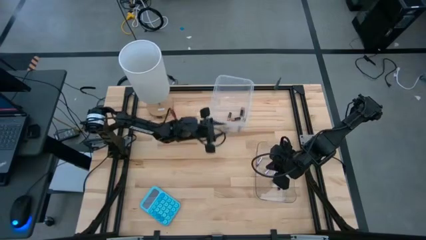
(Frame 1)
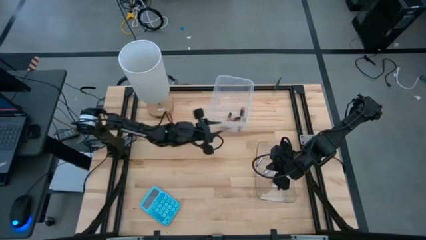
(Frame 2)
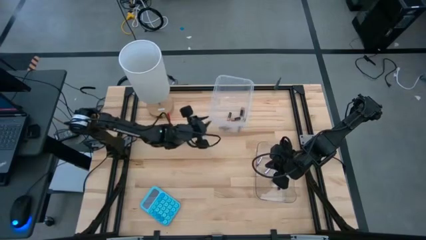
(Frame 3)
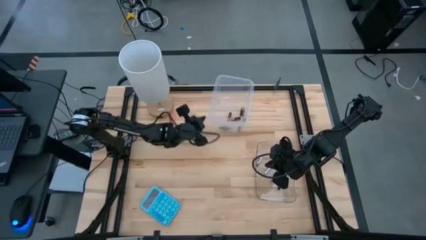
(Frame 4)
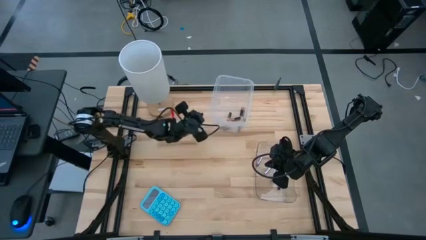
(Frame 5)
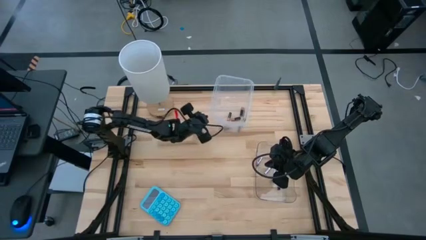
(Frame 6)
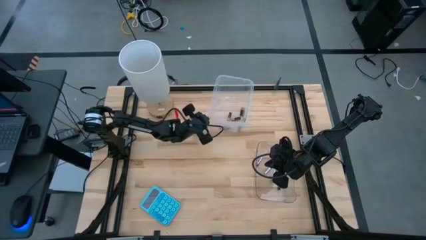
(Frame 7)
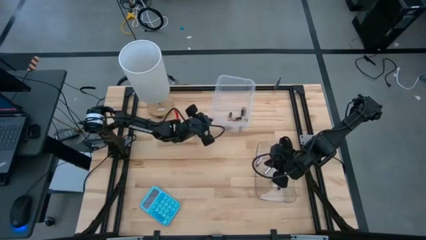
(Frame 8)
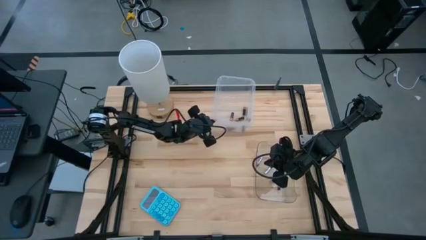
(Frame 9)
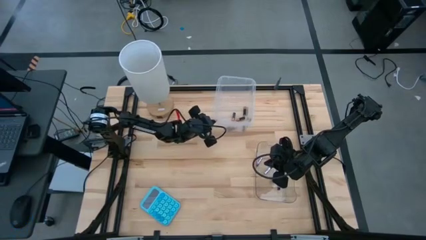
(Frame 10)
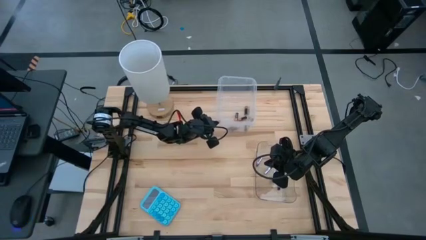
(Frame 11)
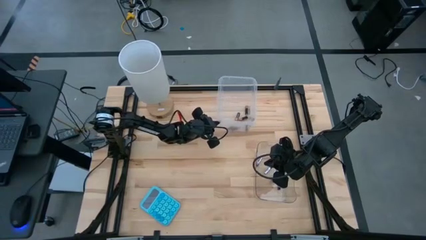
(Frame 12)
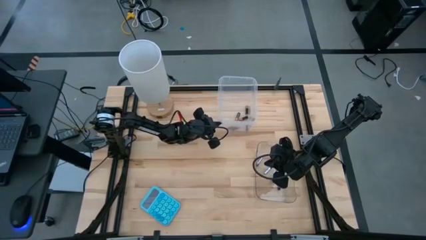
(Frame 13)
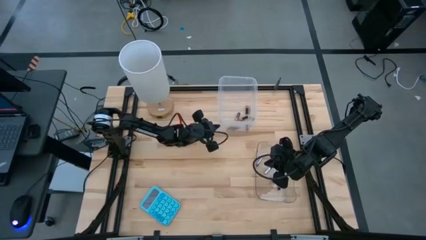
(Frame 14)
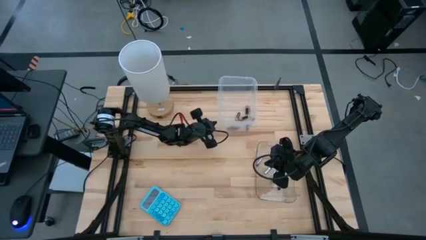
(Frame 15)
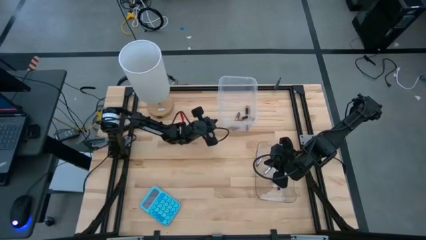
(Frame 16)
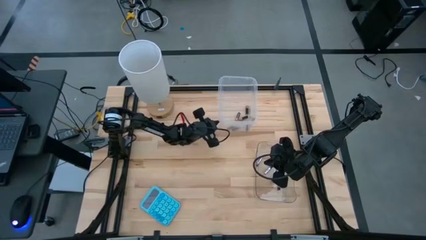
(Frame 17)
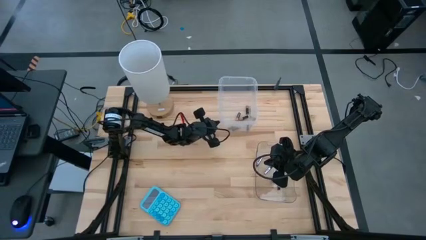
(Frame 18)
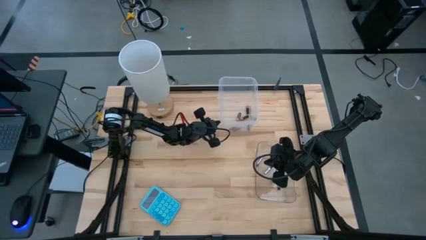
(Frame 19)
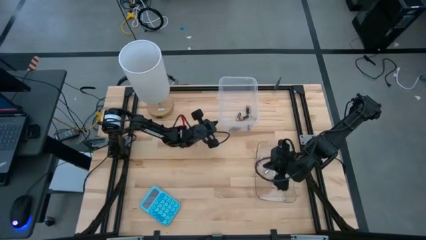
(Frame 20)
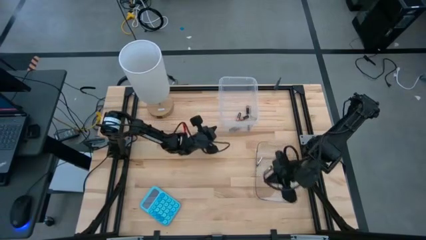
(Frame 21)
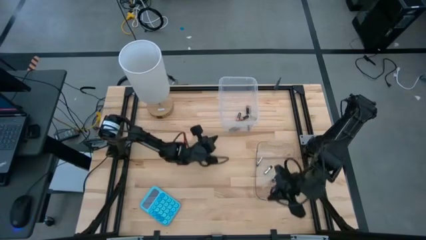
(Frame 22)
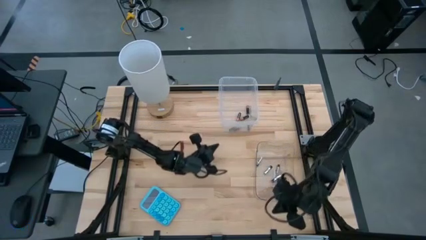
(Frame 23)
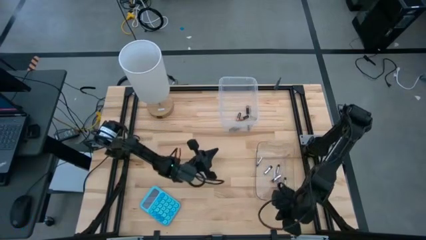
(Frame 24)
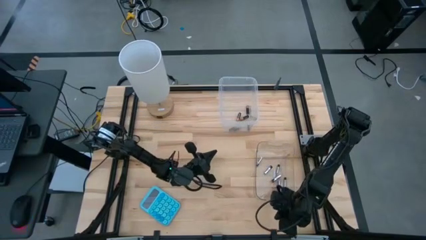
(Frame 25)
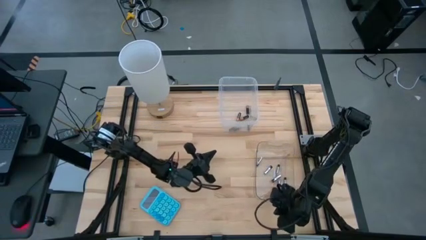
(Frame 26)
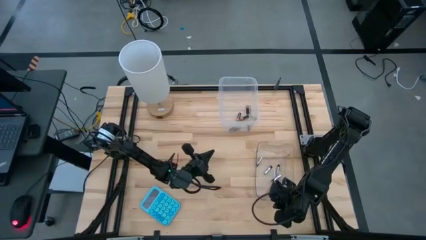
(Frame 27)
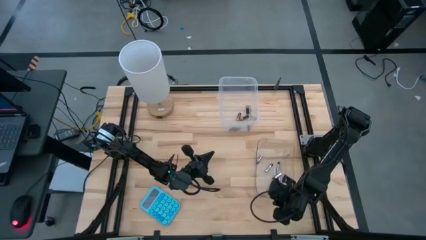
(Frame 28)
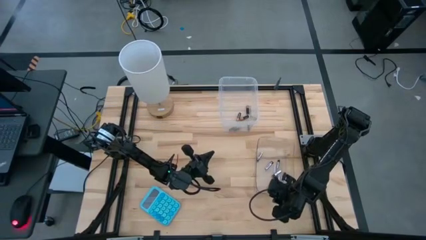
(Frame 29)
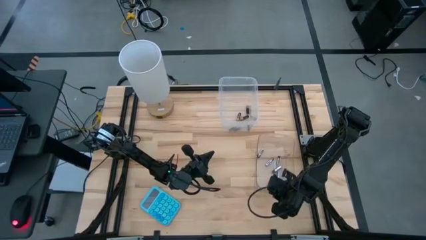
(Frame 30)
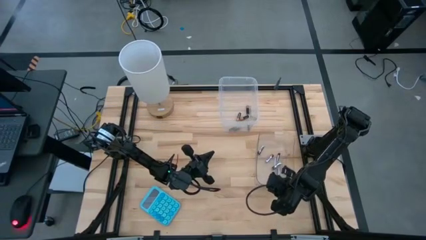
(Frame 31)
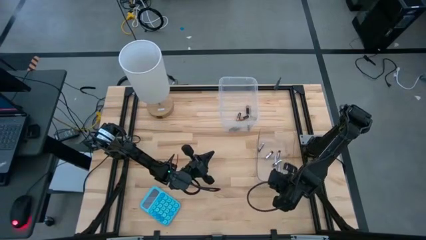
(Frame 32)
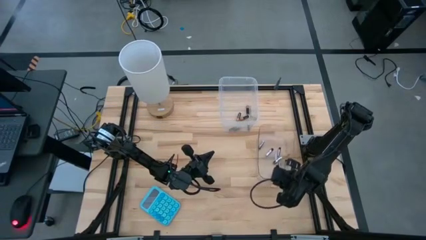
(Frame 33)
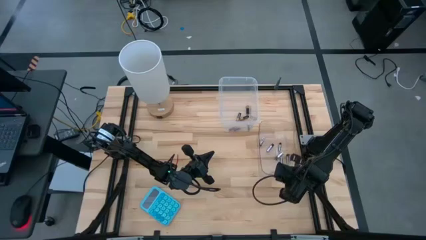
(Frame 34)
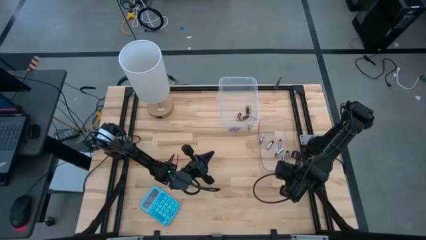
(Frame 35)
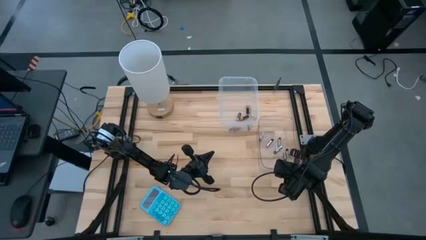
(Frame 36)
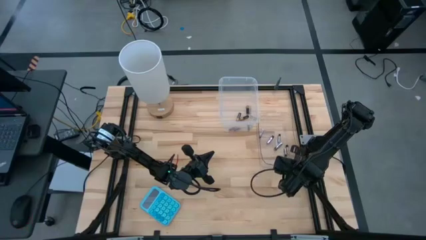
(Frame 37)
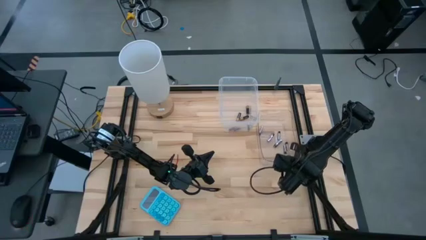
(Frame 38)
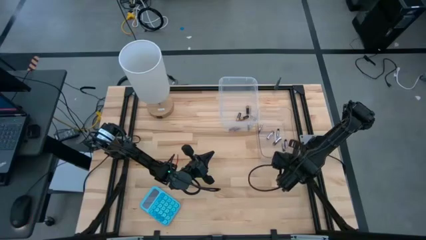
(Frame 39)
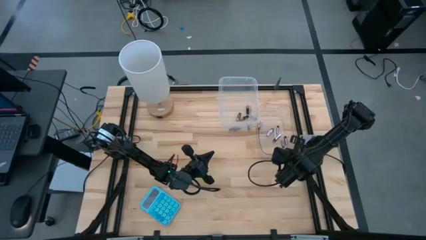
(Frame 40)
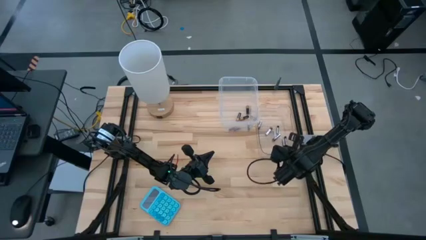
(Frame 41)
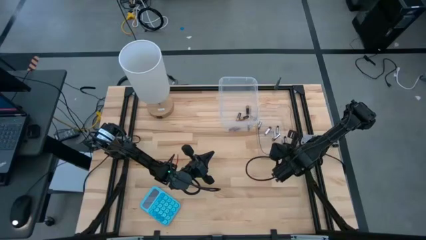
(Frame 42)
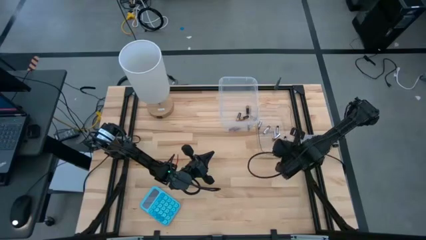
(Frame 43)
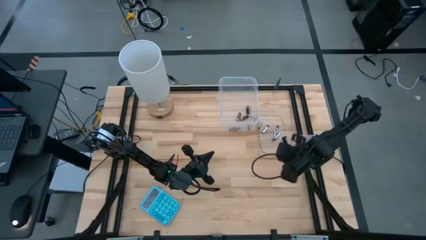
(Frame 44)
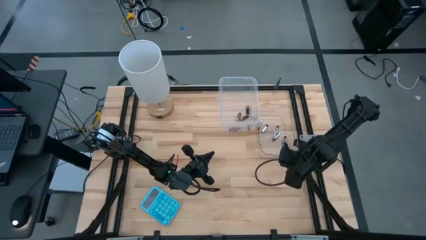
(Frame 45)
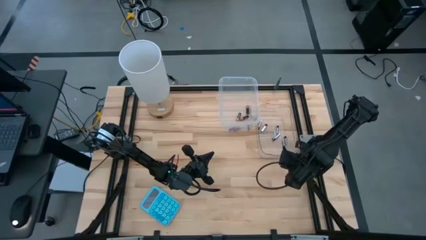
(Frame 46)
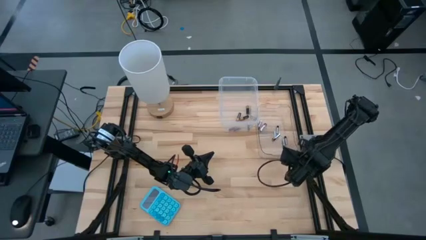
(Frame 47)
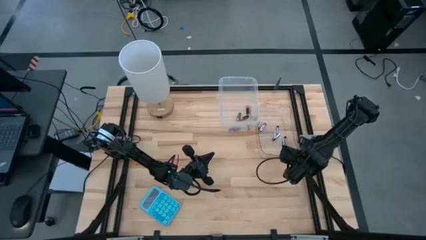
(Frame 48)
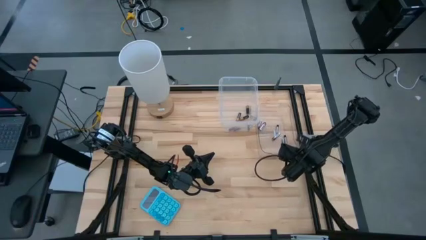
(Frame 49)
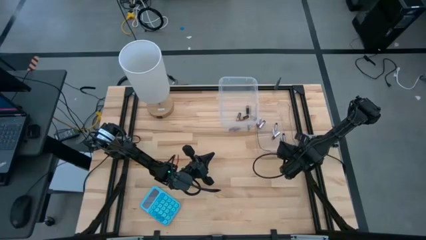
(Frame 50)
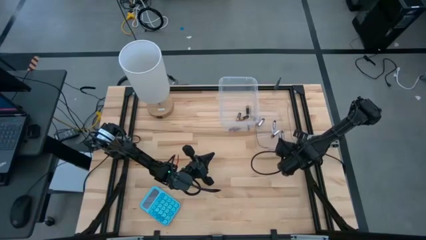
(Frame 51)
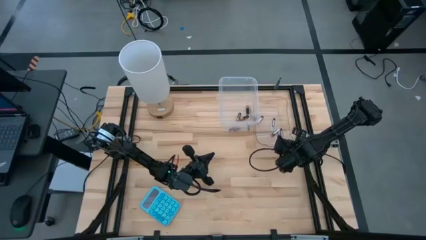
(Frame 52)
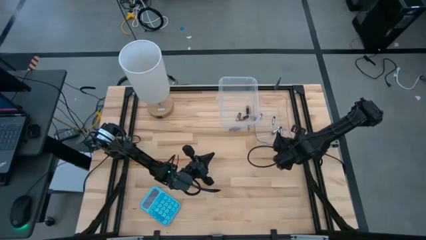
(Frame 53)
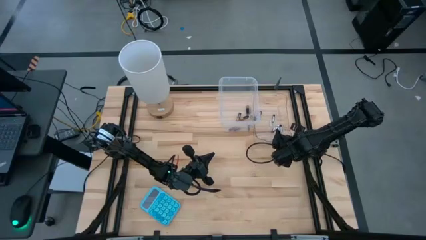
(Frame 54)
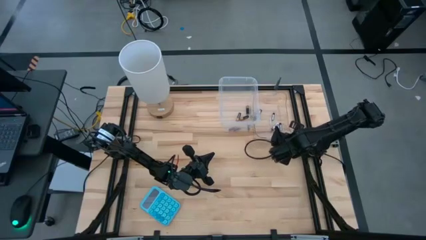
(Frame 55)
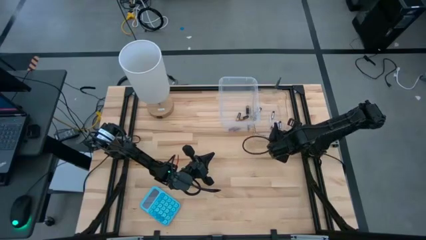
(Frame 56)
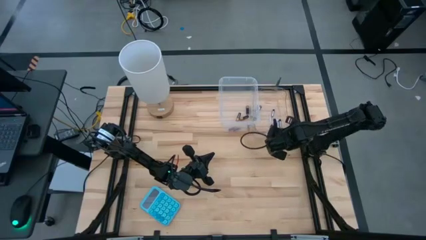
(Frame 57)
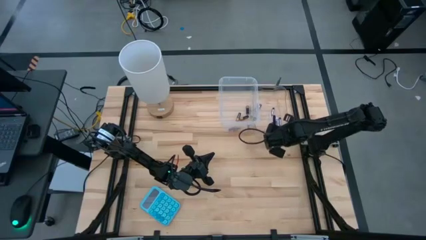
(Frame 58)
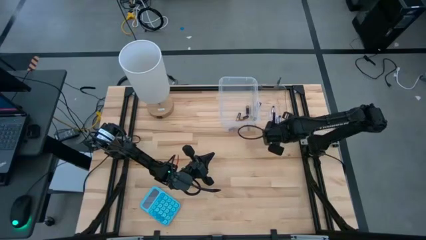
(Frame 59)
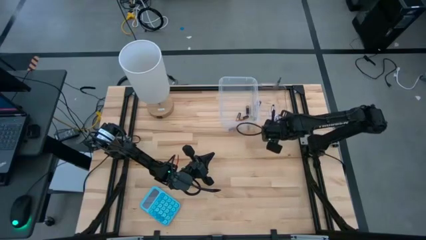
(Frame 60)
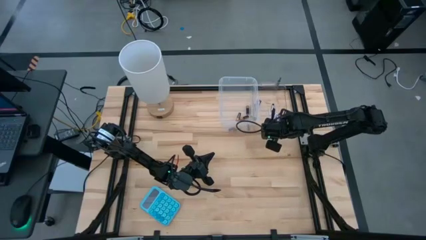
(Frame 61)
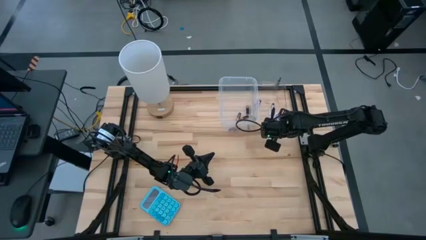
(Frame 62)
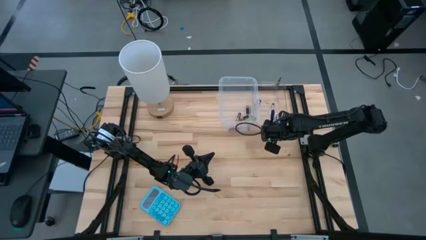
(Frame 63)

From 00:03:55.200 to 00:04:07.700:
Task: Sort batteries
Adjust the transparent bins

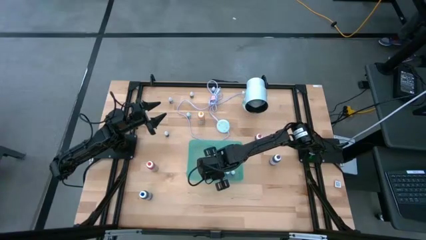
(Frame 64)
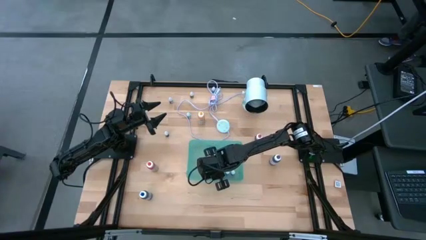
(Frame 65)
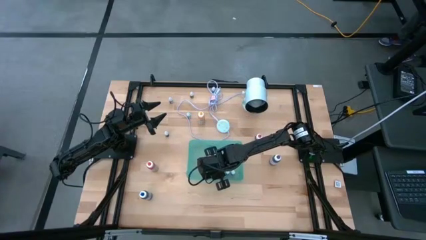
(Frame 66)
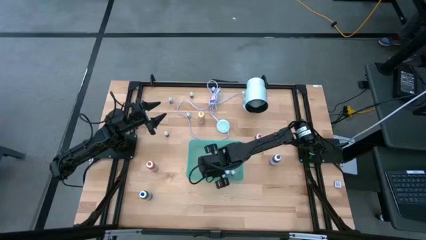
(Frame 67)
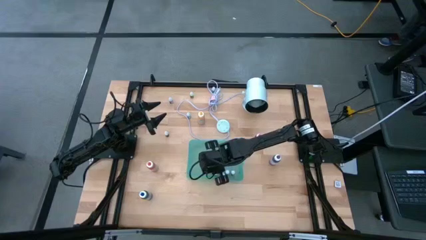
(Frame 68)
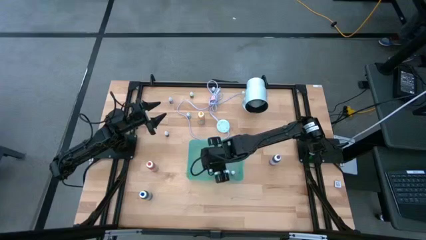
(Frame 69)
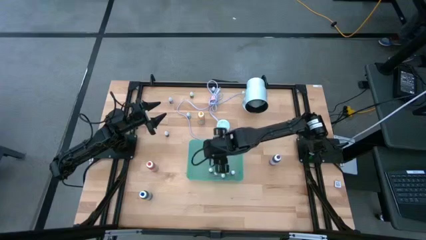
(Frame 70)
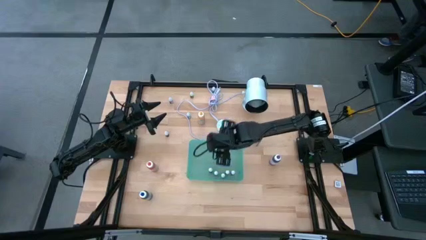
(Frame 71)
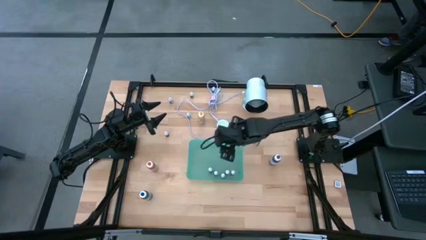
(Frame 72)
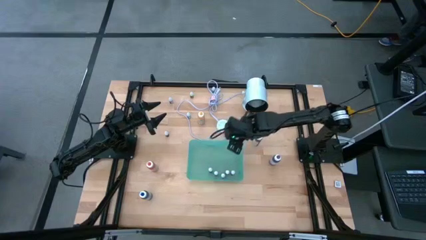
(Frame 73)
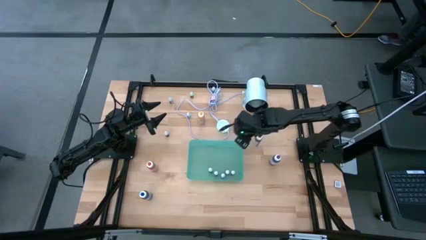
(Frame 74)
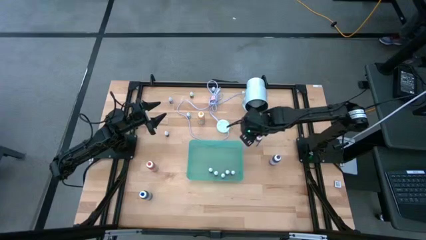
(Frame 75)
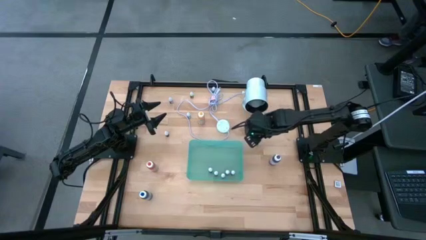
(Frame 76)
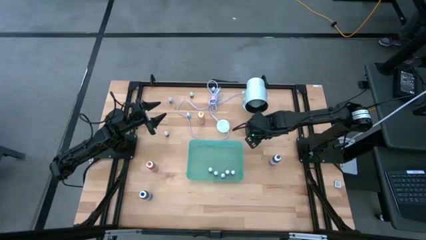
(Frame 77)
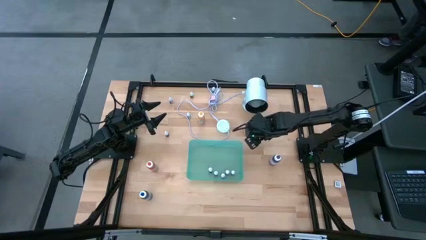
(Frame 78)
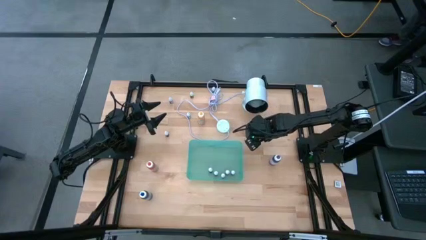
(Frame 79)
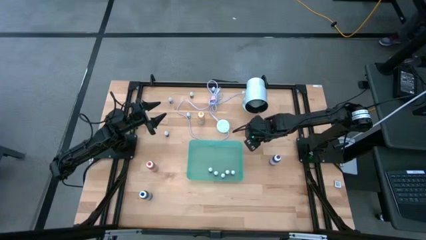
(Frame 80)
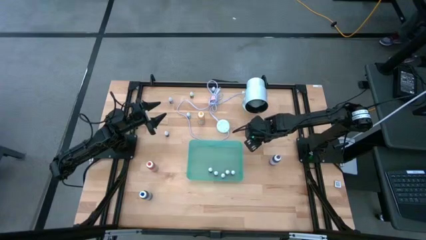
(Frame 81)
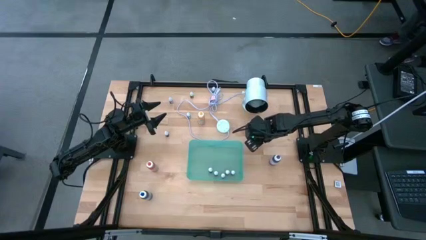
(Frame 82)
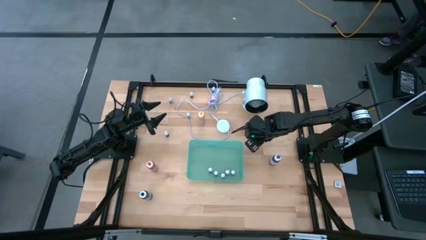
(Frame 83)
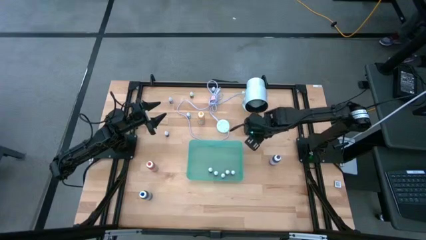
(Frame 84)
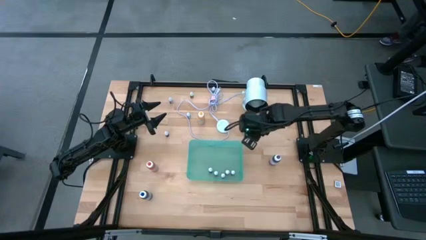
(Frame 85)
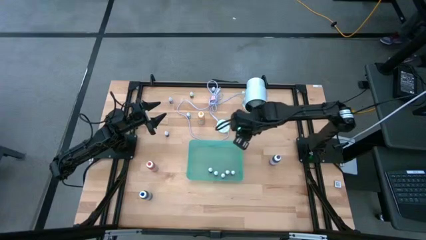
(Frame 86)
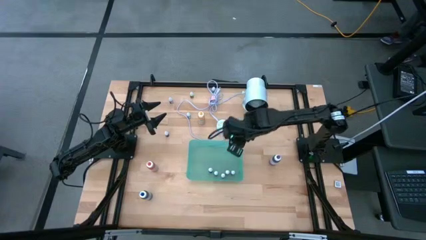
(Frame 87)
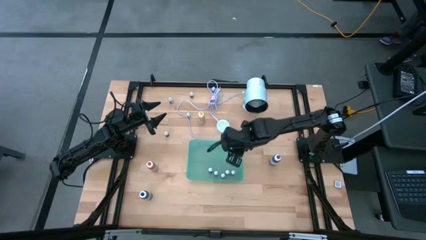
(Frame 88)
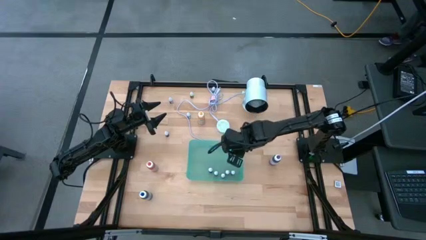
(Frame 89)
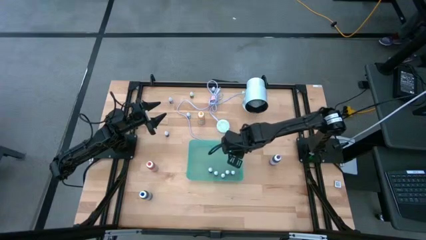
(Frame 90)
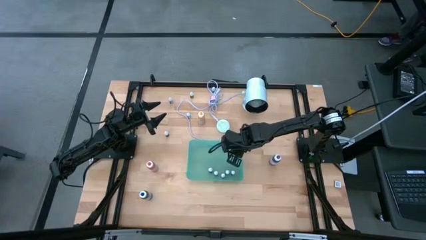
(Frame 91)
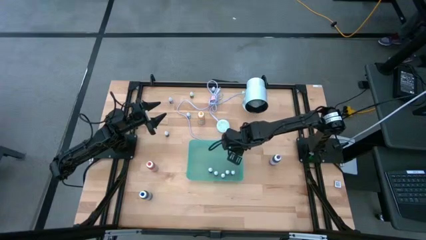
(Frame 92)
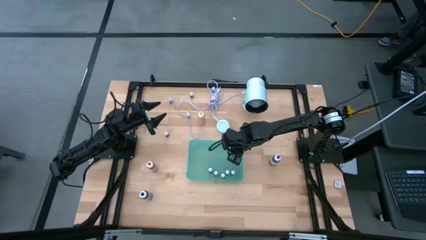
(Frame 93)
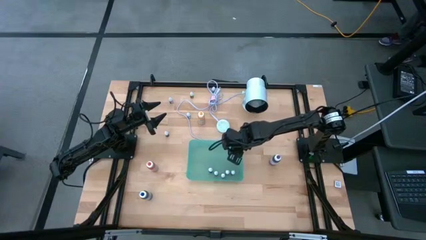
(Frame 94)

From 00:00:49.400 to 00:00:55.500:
Task: Pick & Place food coloring
Put the big pink food coloring bottle into the bin
